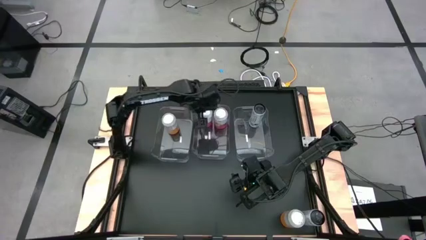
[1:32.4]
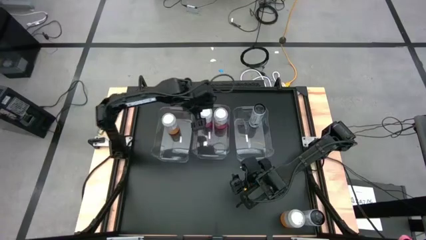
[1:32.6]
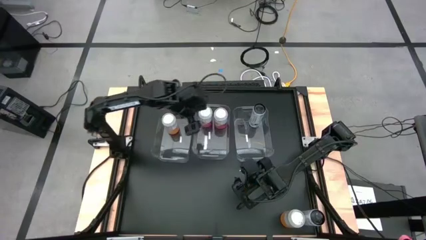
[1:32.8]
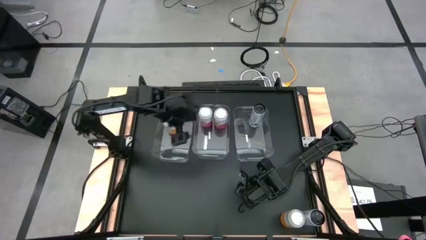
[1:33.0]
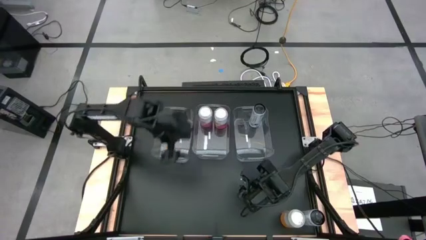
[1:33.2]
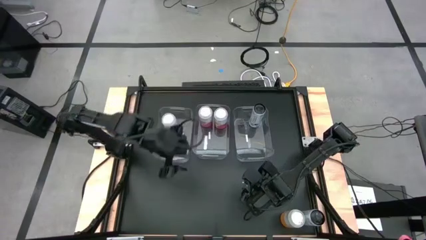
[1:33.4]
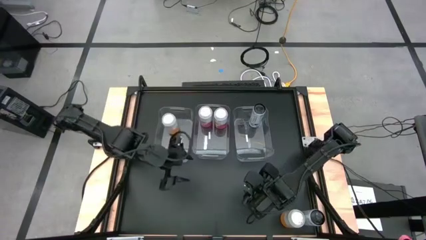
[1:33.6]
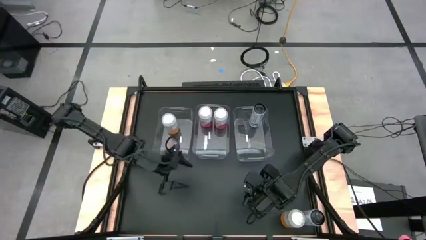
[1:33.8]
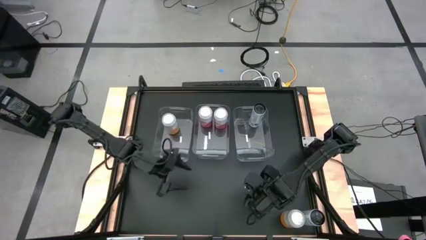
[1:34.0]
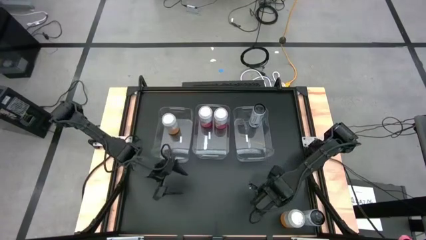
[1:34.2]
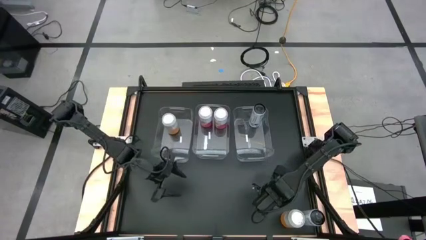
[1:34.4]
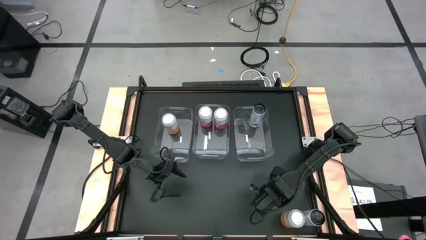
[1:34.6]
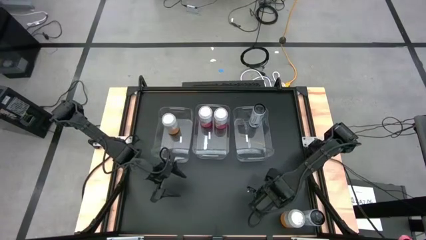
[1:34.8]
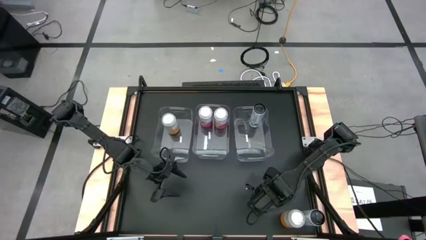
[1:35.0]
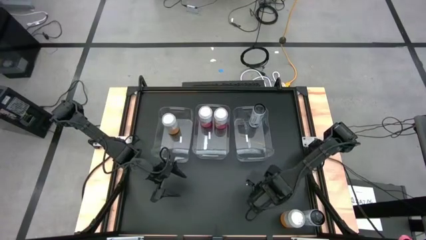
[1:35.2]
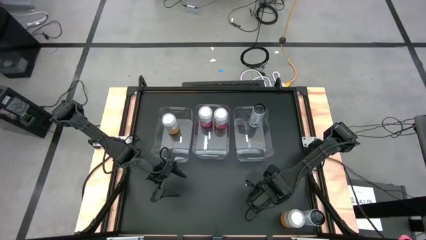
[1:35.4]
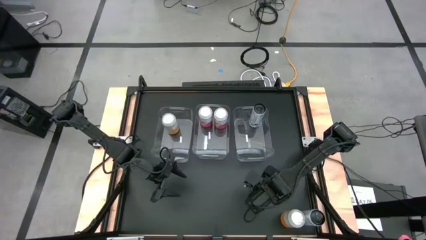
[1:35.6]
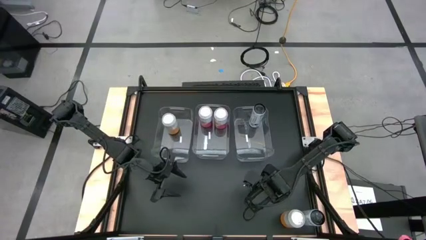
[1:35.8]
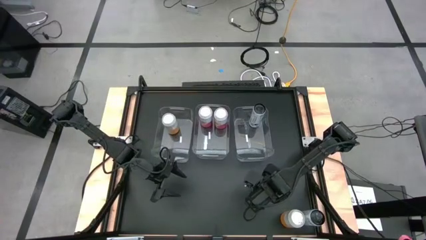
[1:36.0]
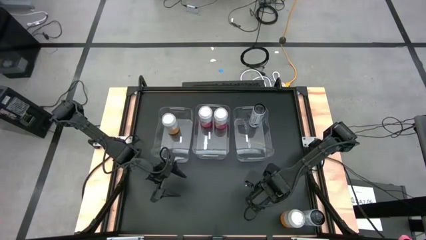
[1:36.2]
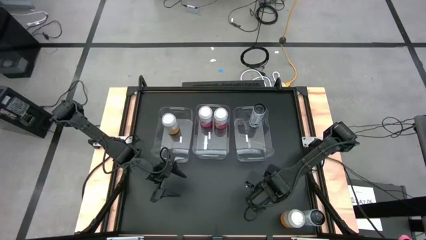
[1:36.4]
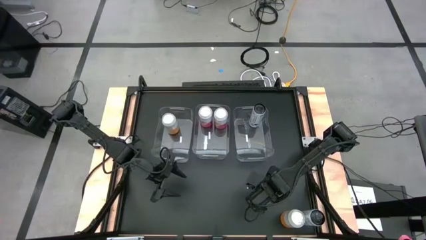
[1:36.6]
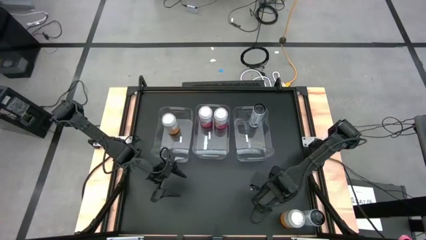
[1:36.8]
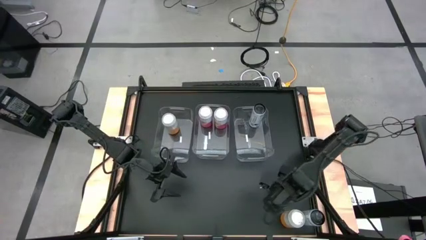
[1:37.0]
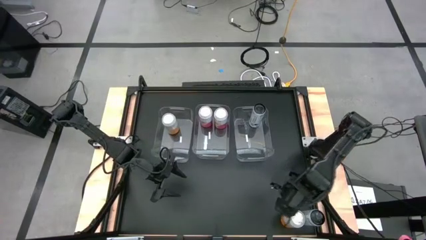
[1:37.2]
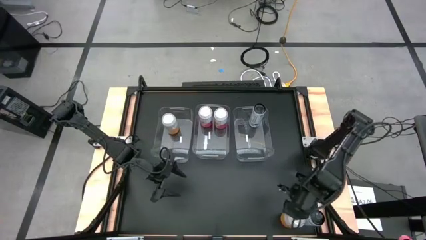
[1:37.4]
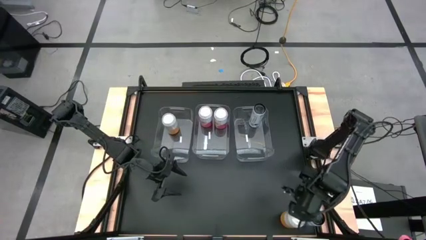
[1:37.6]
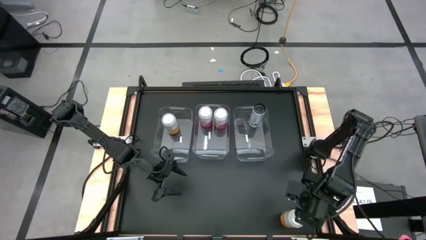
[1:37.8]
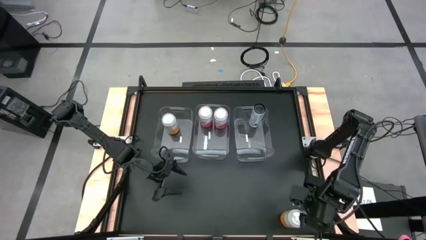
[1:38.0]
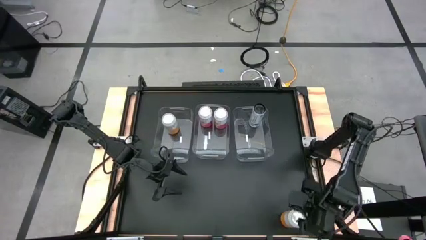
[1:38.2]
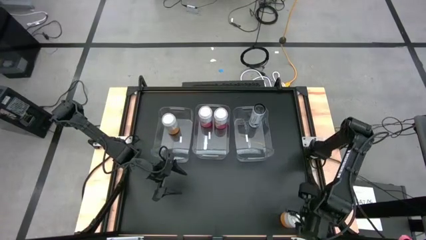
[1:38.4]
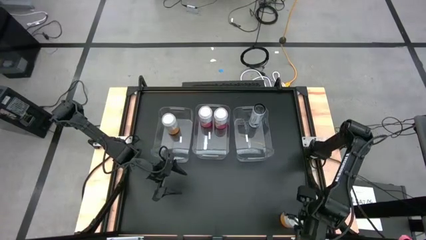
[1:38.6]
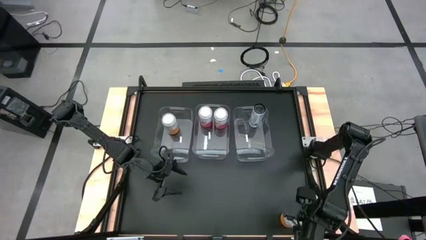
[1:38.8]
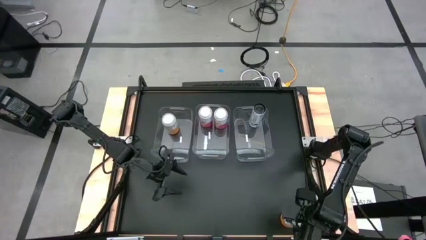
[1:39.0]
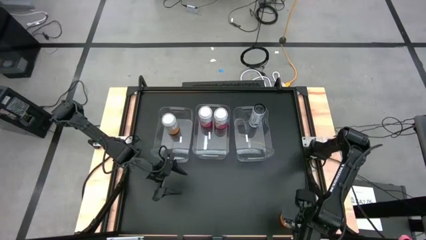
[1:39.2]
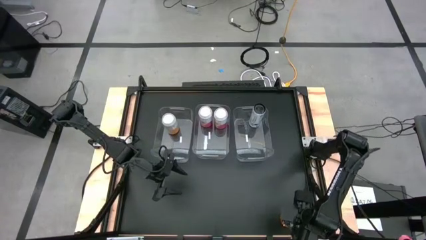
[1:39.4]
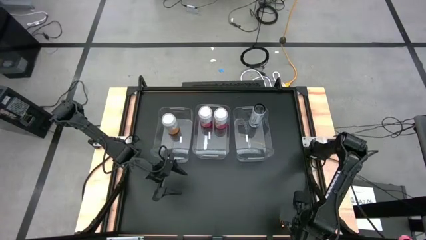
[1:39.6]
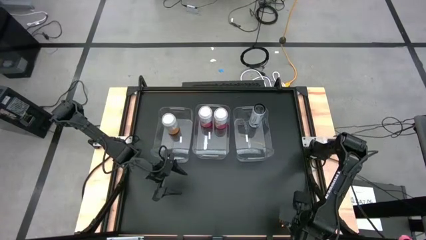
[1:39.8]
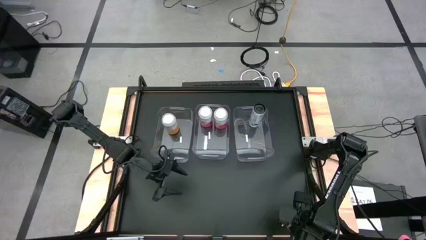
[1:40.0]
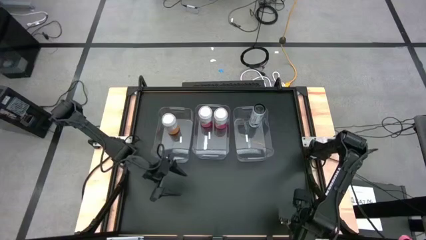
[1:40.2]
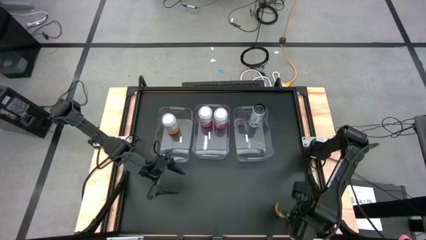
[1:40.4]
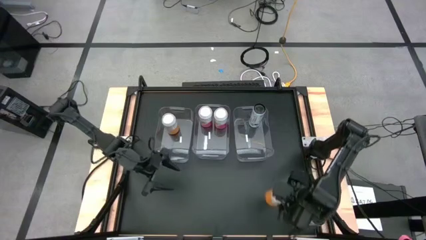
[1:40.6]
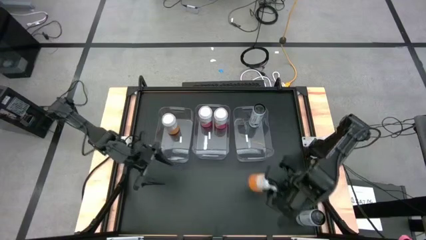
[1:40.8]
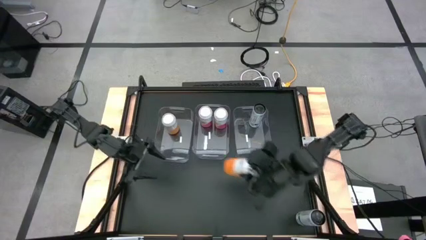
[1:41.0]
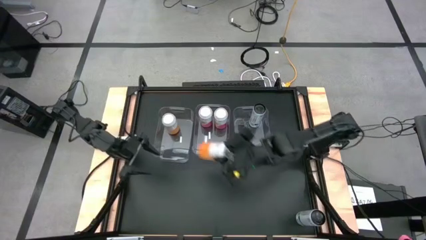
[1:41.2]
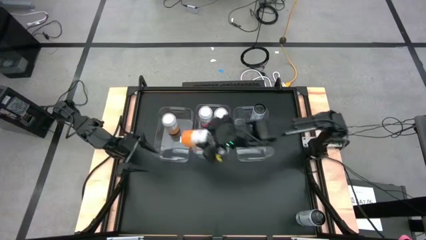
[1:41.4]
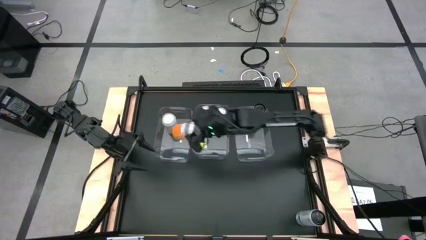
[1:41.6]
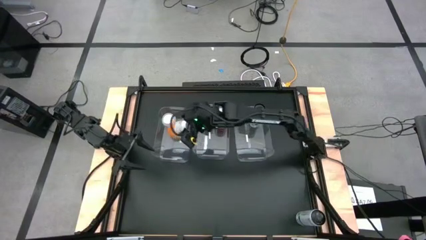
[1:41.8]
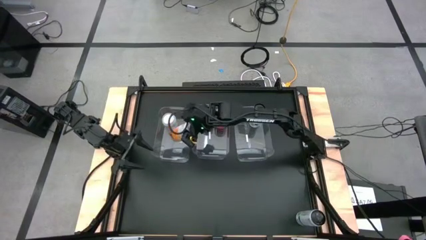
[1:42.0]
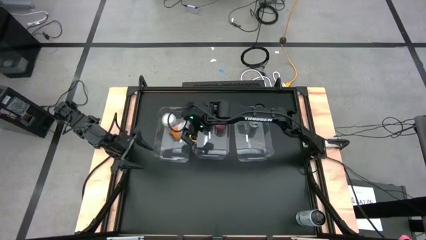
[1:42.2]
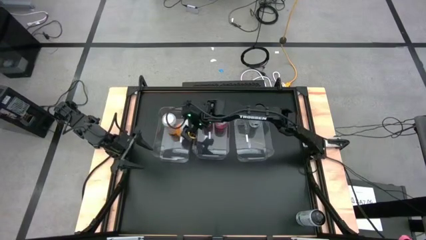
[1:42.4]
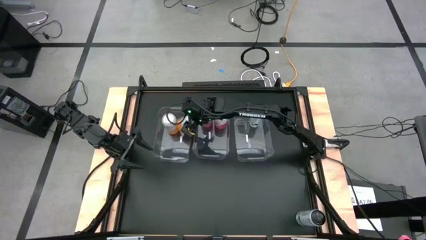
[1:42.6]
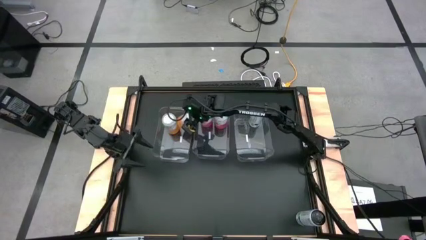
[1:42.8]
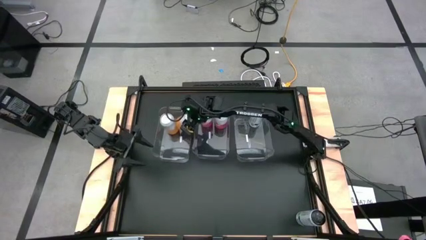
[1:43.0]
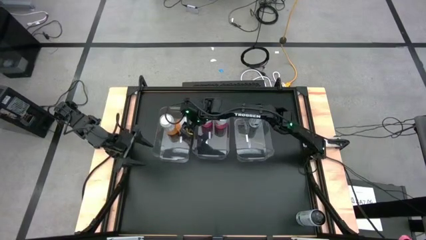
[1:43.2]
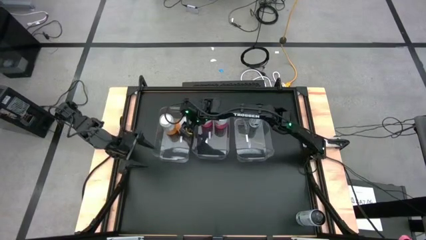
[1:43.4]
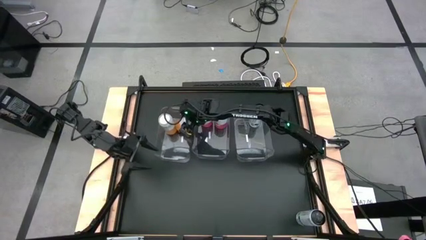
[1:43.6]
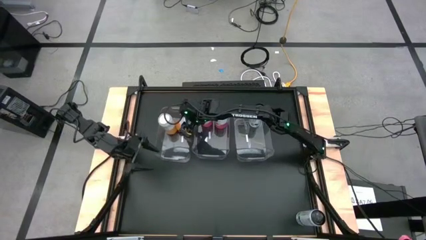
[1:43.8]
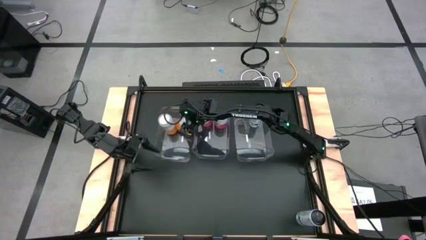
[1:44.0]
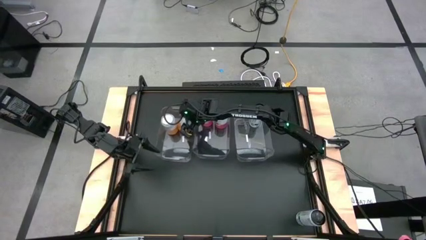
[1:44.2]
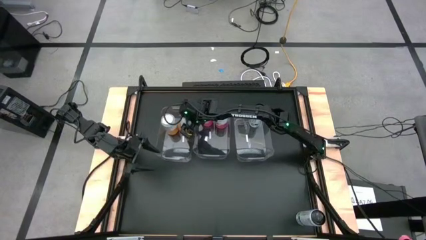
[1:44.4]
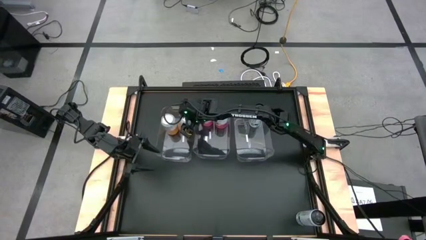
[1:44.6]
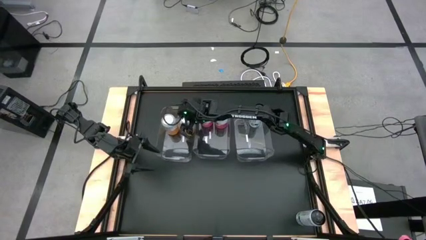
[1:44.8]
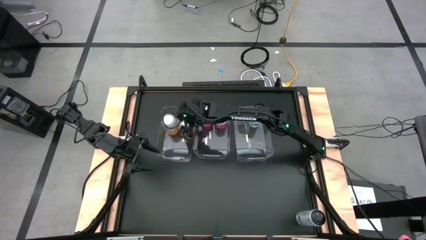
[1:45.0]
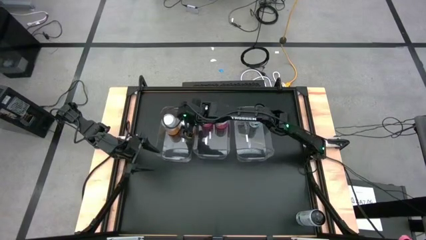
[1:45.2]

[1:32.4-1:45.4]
Task: Sort soda cans
Put the yellow-white soda can into the left transparent bin

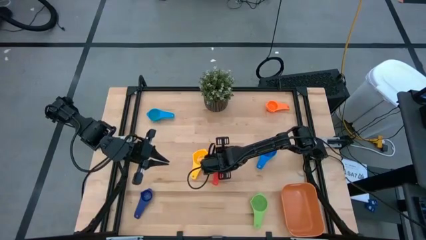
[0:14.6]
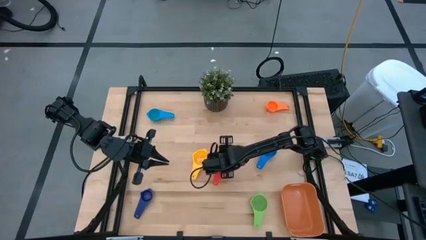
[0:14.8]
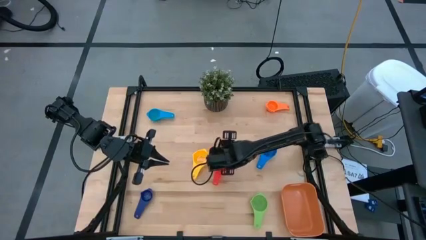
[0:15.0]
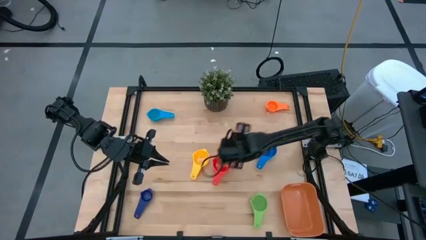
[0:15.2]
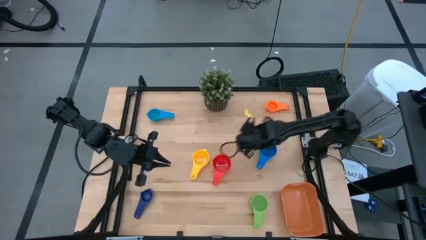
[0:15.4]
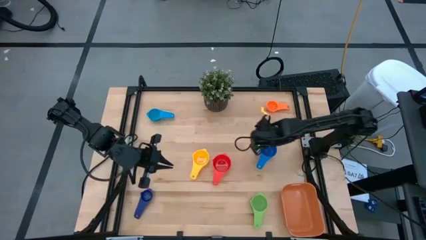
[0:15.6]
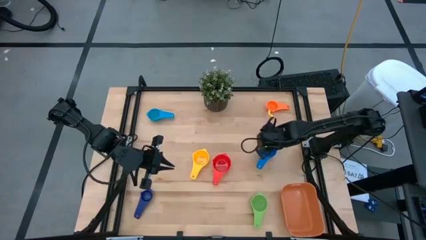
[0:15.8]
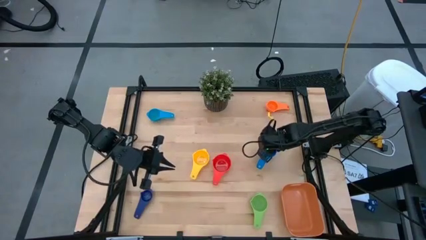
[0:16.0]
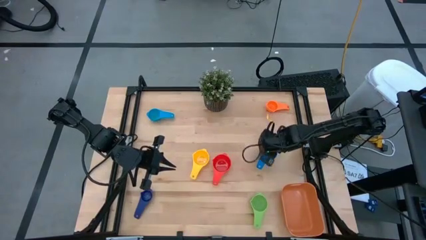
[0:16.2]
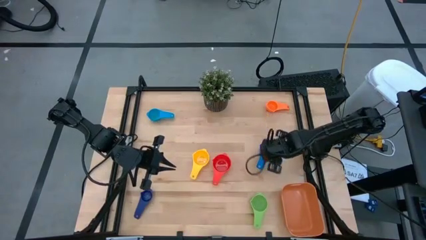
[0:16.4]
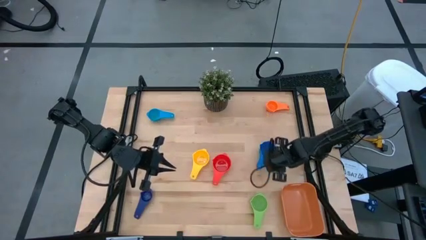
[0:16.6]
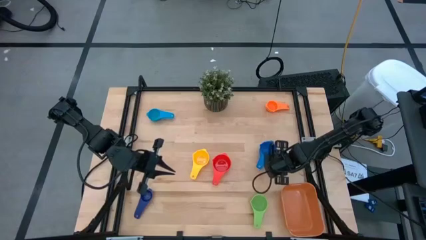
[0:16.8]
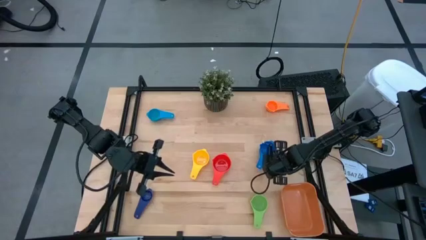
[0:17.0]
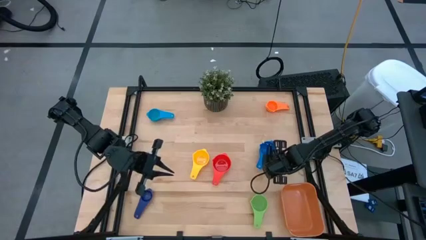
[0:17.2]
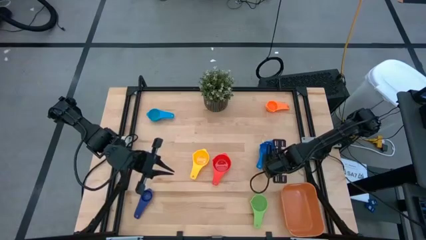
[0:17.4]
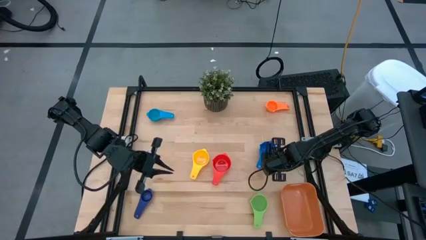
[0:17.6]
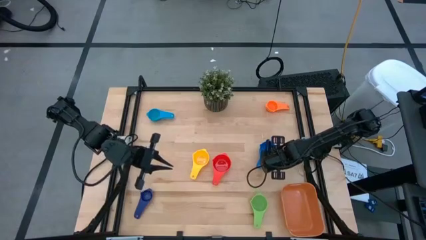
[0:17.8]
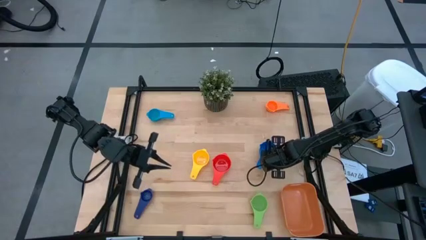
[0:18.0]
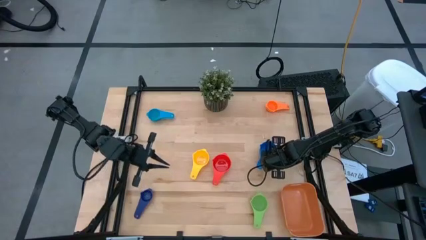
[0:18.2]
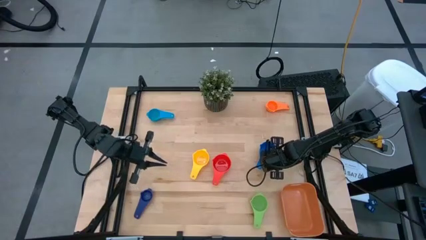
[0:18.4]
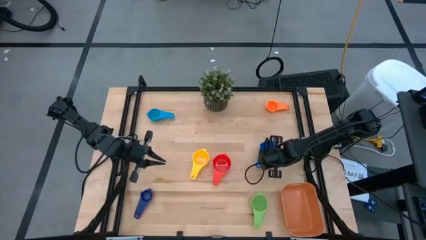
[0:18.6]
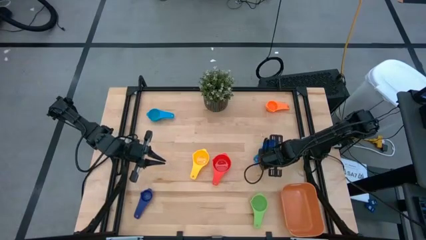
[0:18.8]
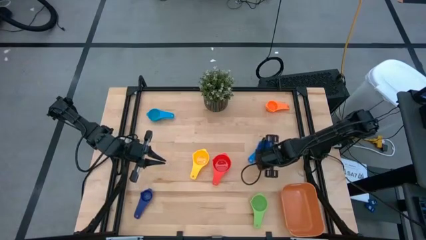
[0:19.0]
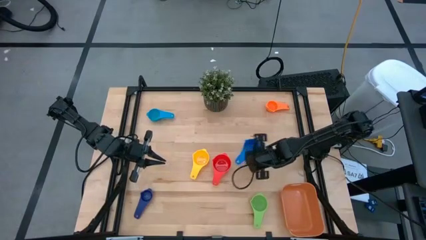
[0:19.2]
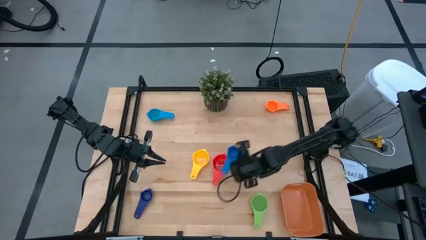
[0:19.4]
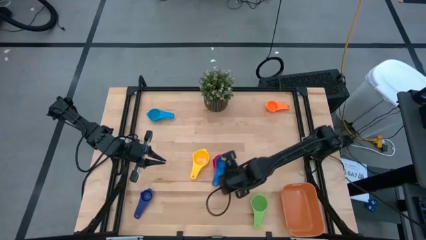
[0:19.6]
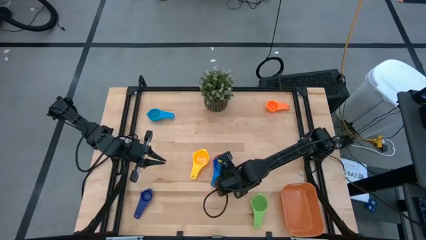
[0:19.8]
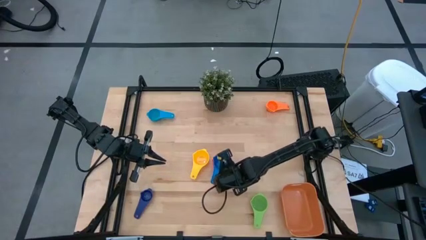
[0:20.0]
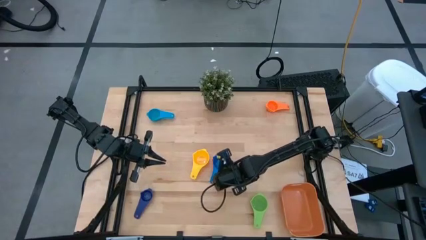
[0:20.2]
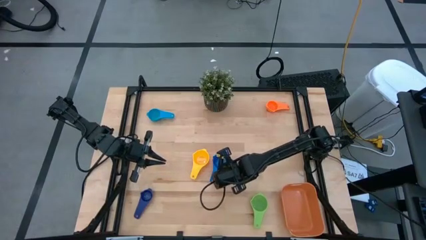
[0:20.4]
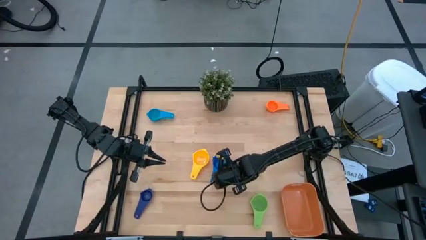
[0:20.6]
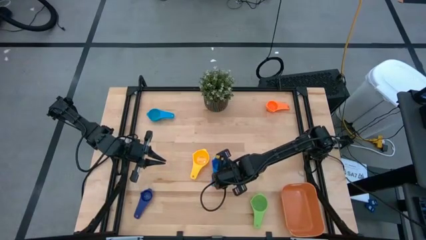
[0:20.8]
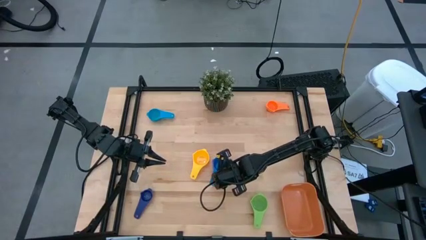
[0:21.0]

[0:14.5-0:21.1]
Task: Nest measuring cups in basket
Stack the blue measuring cup on top of the red measuring cup
